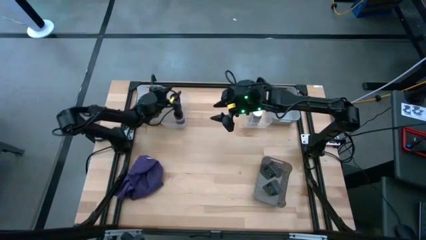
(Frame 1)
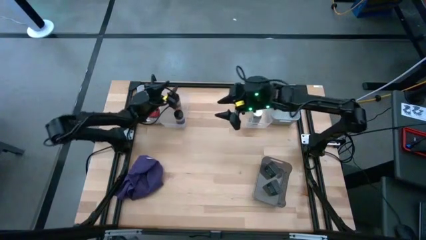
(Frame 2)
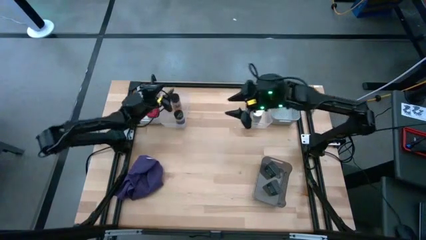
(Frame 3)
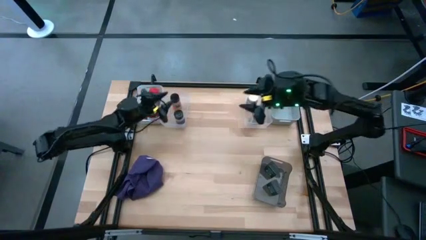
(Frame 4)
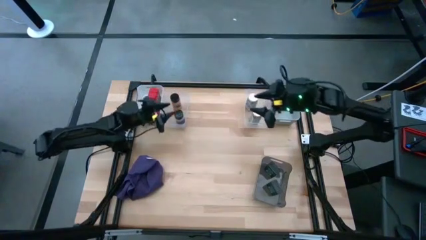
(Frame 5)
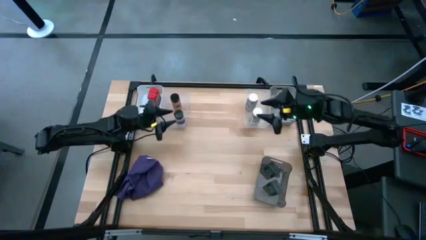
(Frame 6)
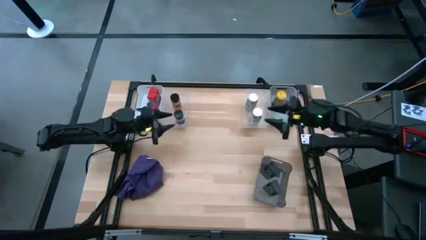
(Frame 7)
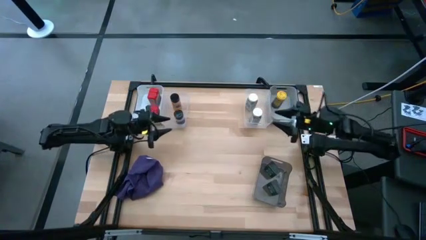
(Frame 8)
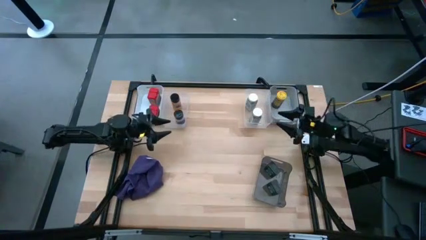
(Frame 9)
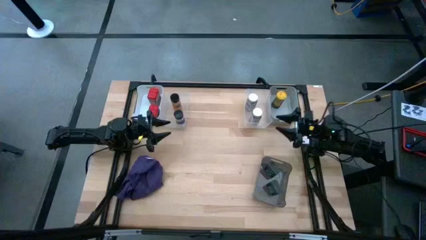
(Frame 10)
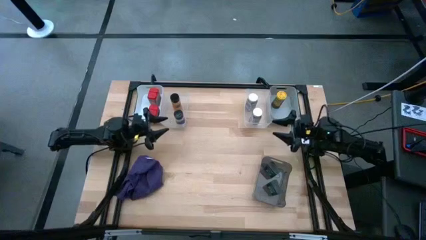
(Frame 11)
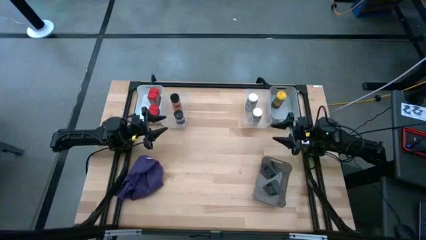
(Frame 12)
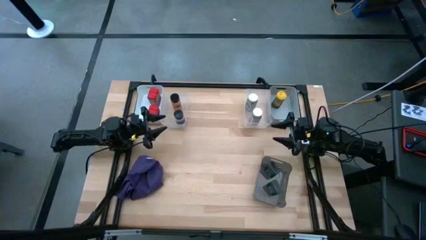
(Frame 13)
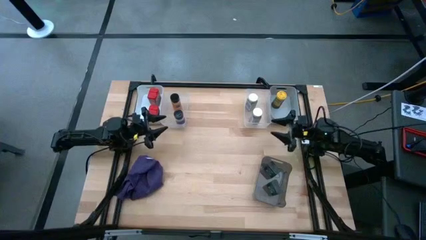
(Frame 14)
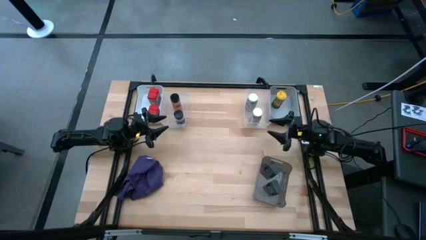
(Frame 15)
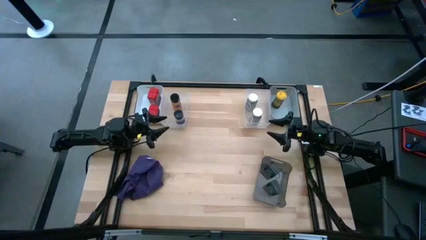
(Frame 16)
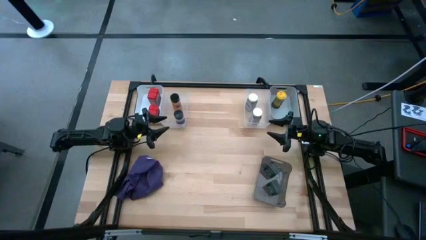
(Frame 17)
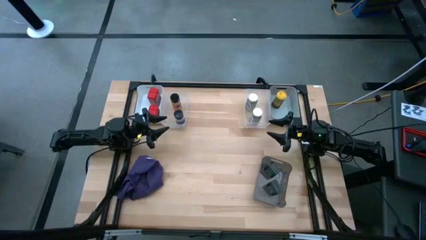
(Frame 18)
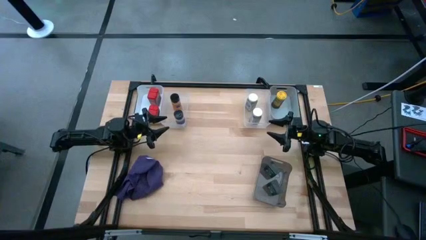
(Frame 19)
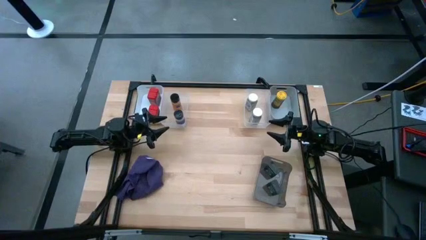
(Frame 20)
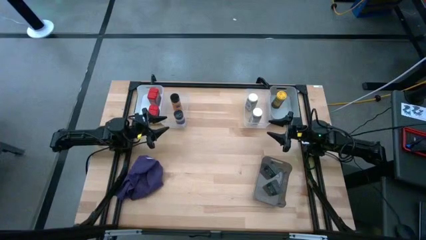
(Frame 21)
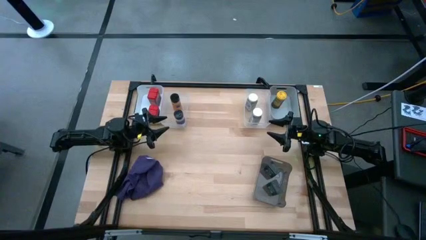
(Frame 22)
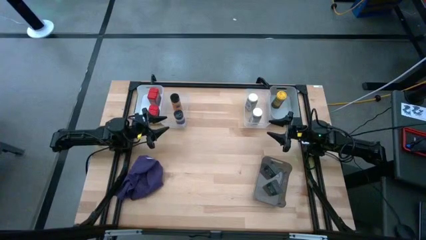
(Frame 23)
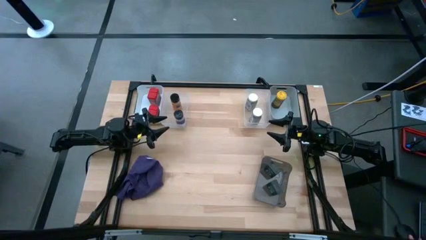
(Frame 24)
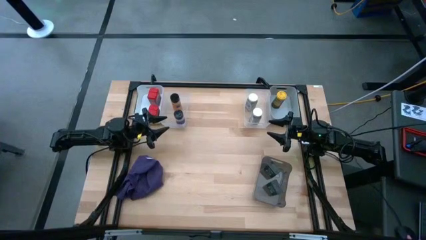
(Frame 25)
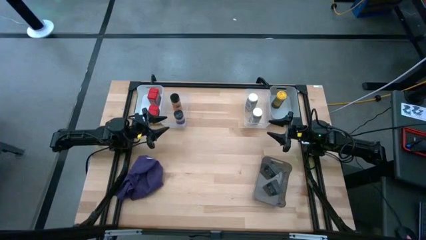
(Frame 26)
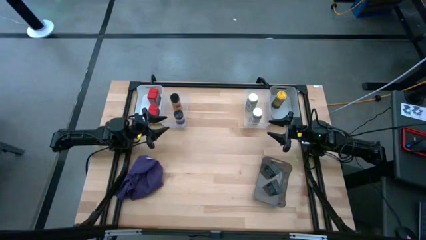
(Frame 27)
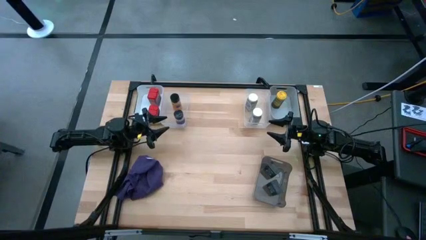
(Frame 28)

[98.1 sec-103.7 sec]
Task: Sort spices by type
Return to Home Position

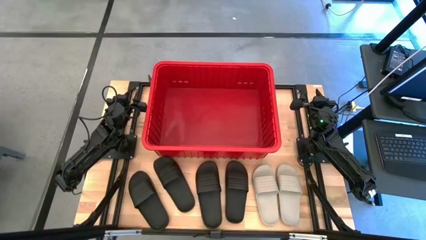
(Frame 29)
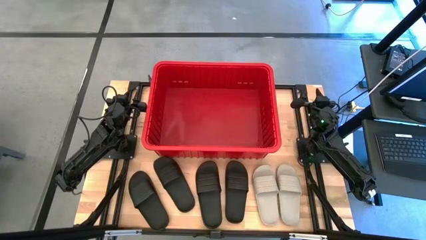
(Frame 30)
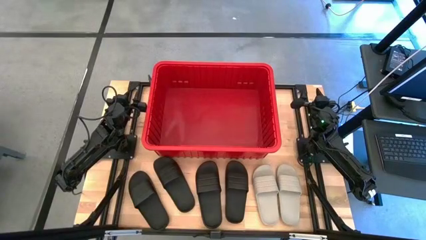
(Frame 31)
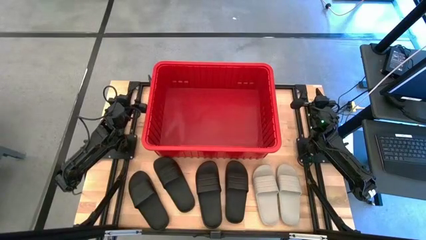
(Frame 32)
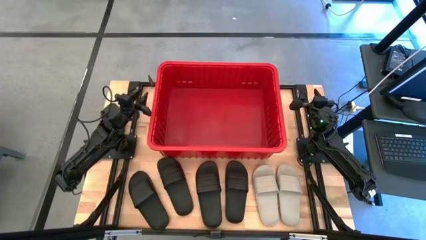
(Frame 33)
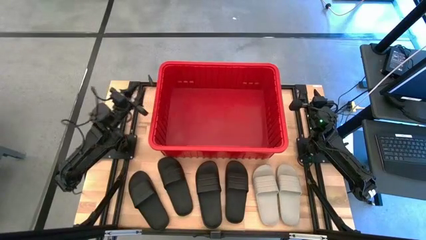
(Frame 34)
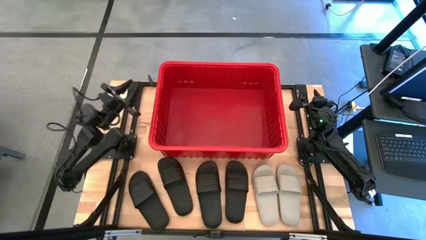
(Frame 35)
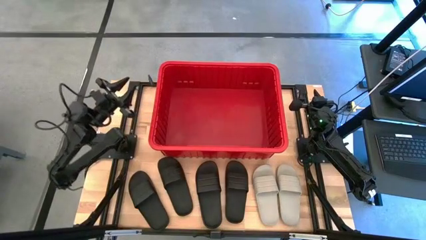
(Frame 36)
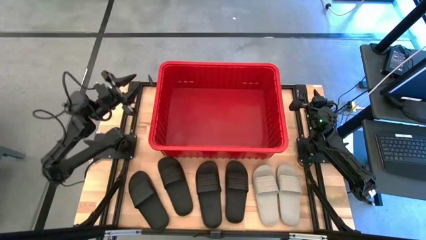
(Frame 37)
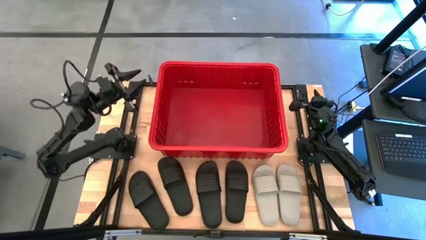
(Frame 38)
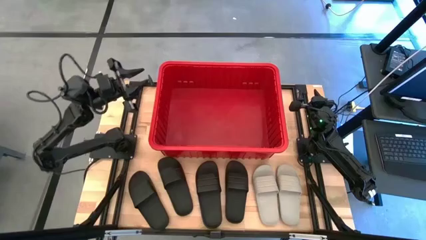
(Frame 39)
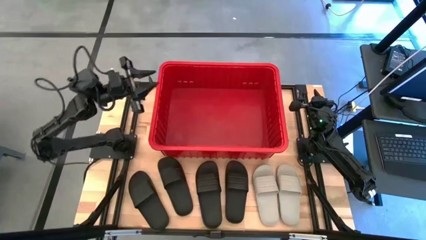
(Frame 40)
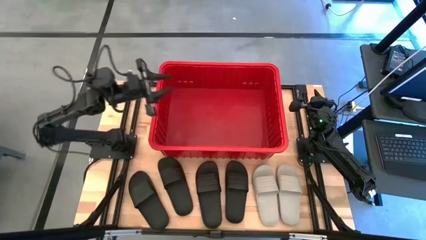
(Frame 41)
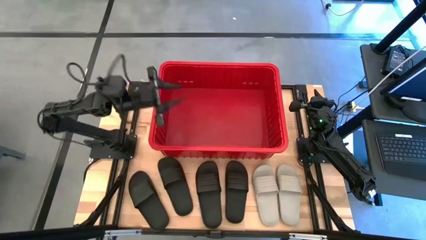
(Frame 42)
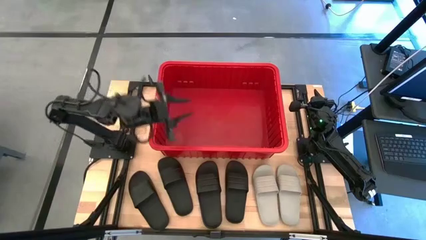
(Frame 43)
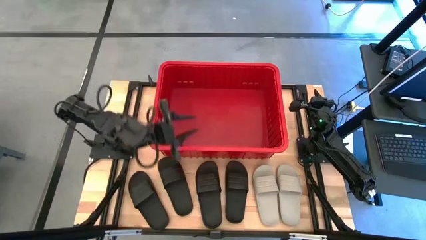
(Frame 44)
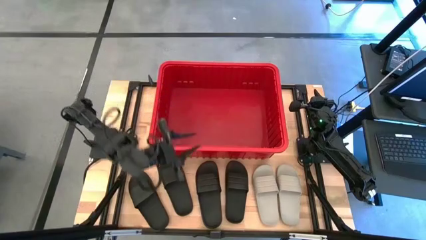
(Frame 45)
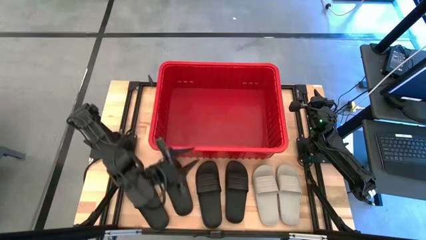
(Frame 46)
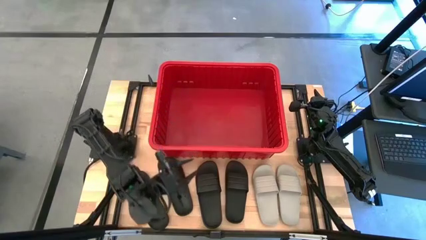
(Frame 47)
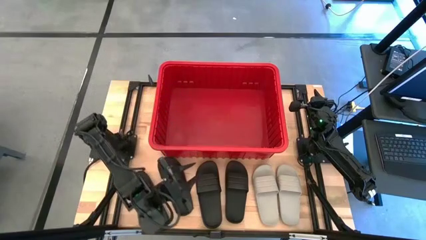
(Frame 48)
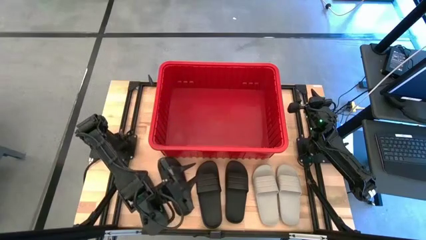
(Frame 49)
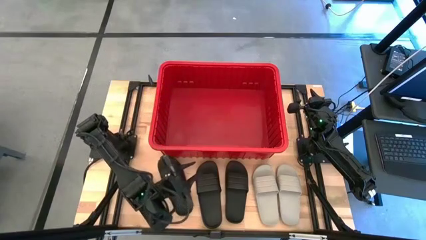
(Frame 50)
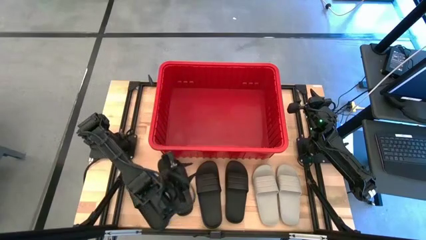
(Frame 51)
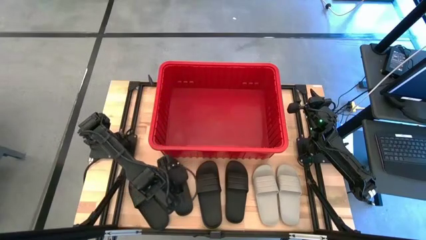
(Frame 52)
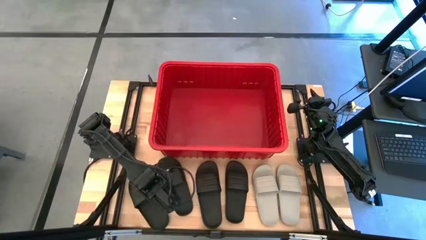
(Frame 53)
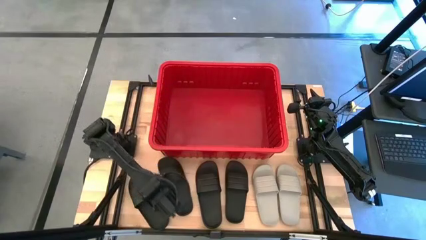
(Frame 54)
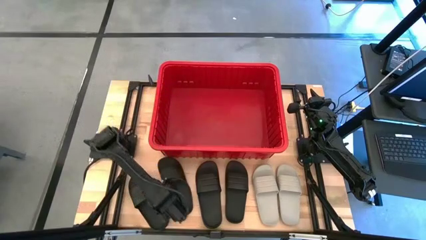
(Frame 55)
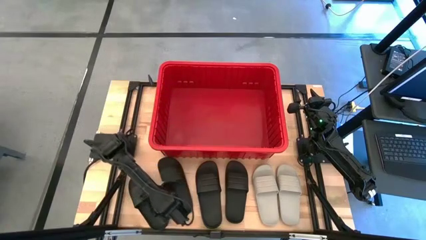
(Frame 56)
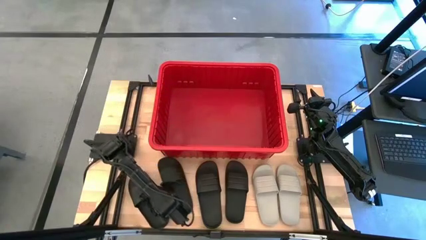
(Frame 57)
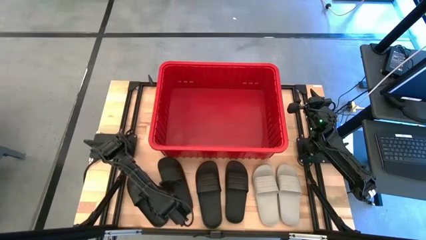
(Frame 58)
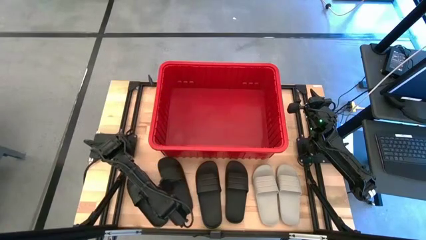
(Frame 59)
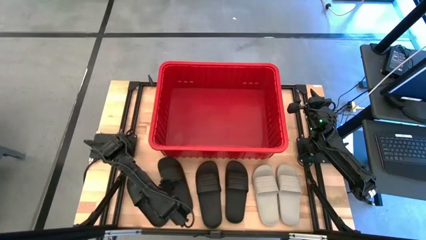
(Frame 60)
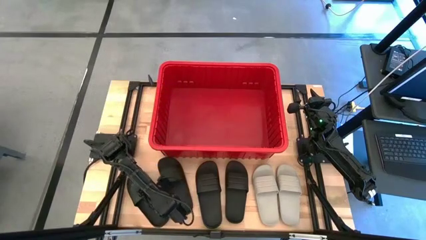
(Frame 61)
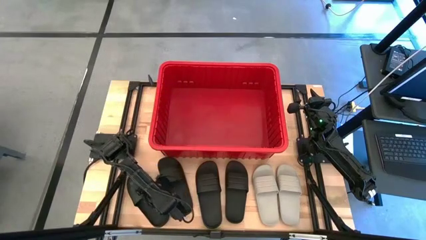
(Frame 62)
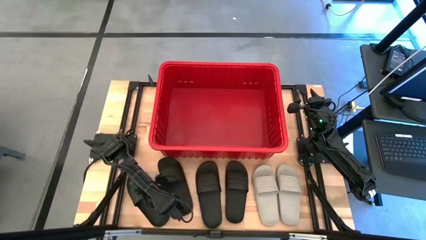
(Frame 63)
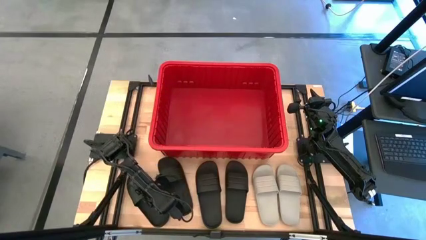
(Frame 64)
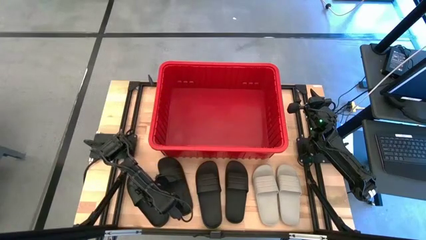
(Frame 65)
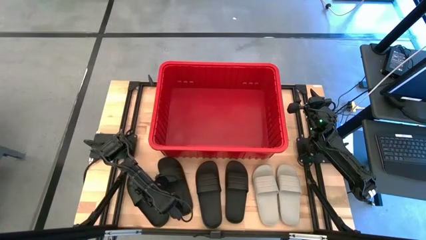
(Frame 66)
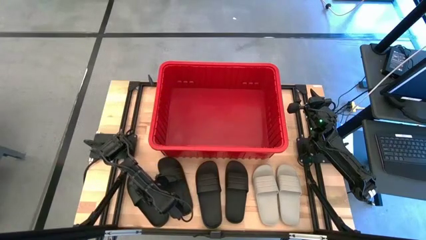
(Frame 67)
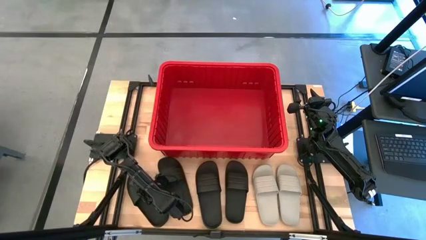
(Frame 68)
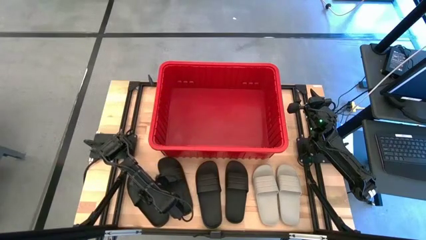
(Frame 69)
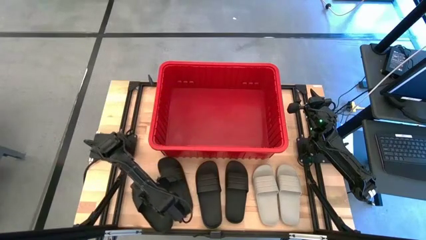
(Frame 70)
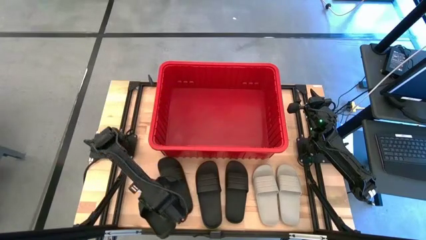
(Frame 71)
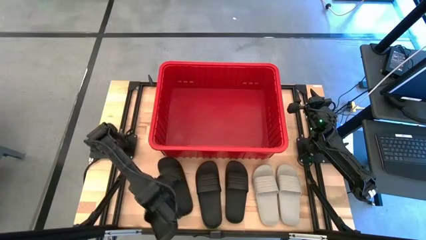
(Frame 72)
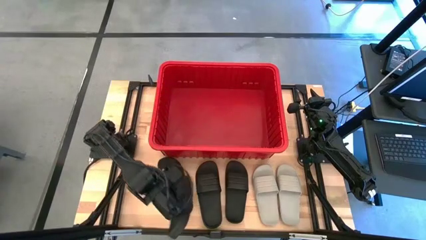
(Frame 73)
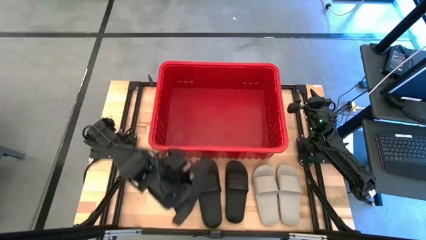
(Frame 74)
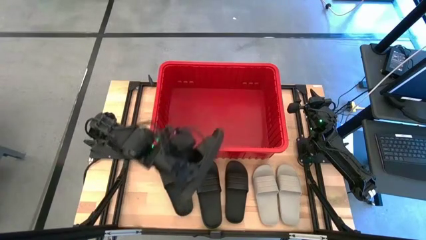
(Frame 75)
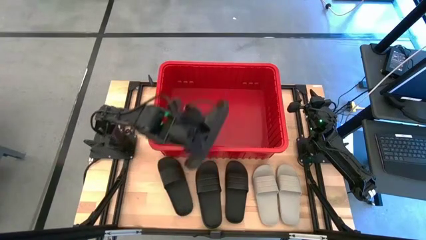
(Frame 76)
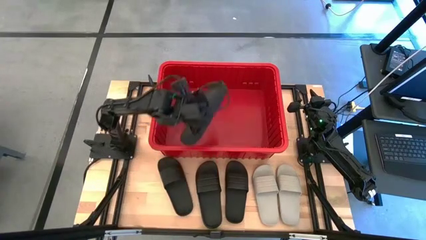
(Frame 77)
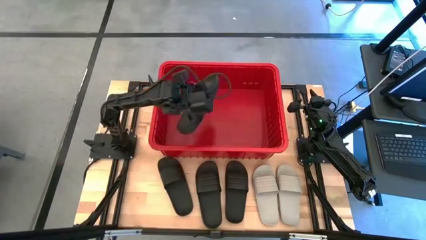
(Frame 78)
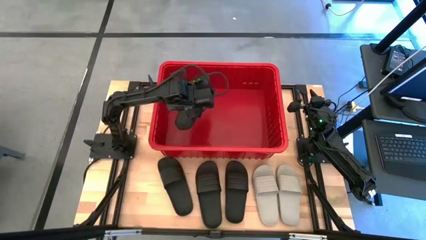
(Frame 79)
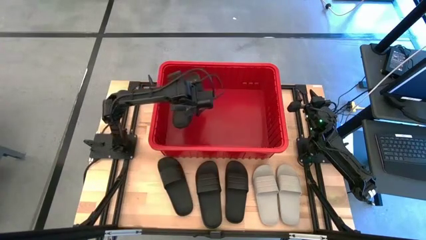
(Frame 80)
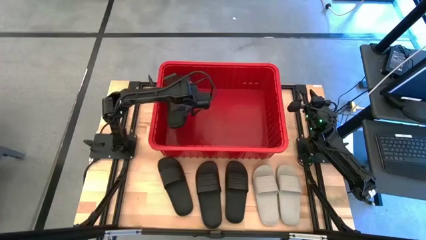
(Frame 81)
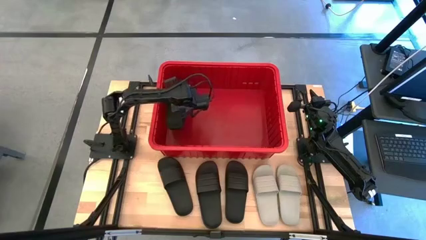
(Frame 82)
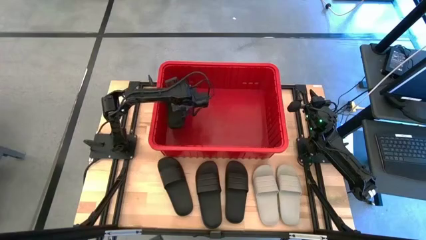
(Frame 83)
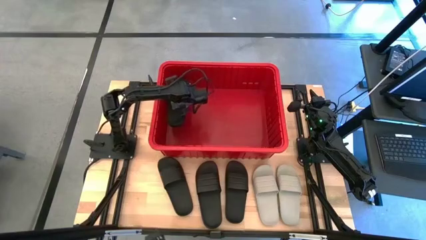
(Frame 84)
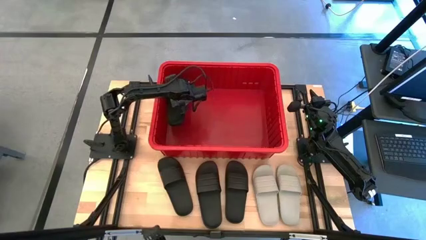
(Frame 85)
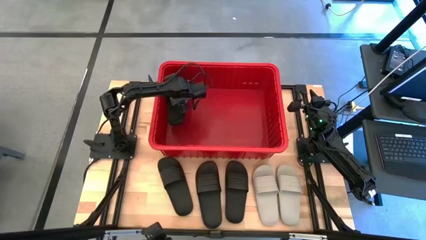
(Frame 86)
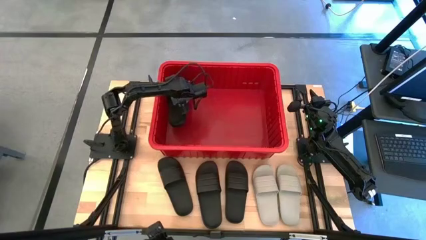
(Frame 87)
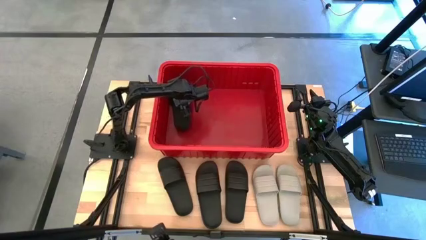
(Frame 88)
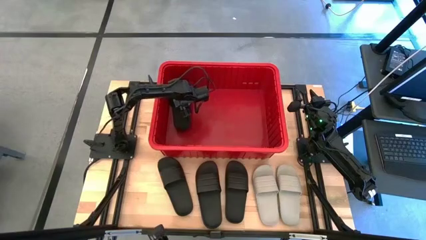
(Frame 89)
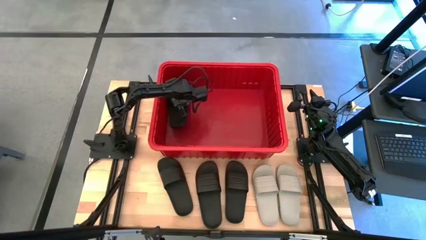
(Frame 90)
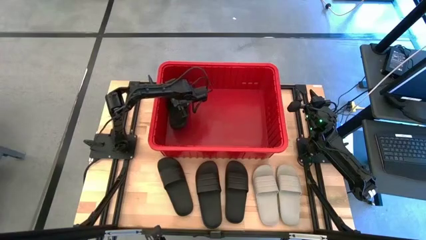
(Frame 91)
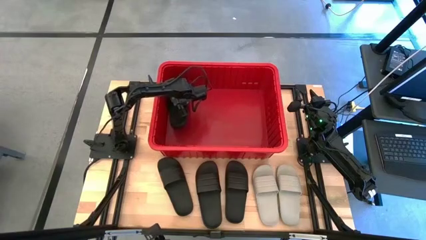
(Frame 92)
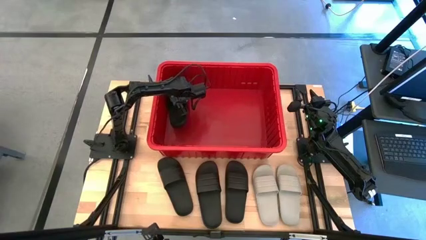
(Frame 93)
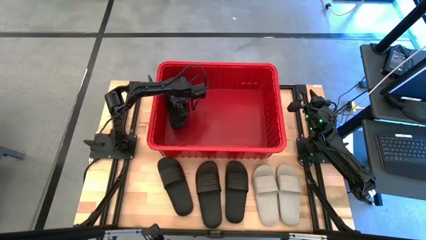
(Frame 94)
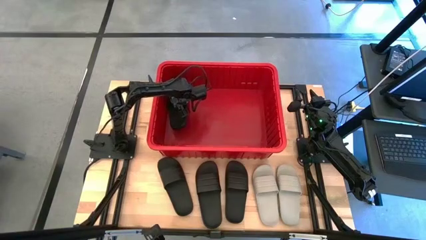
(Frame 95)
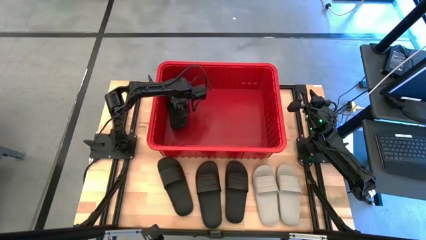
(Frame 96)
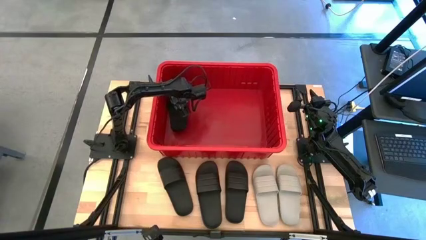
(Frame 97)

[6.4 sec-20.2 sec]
Task: Pick and place slides into bin
Put the black slide into the red bin
